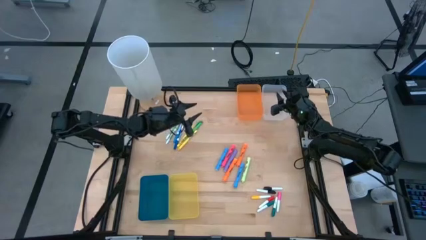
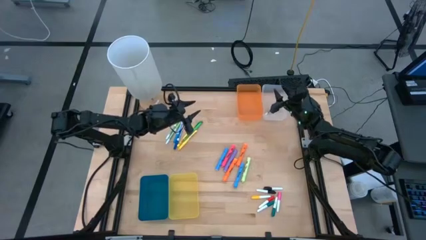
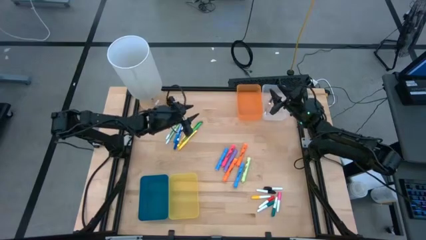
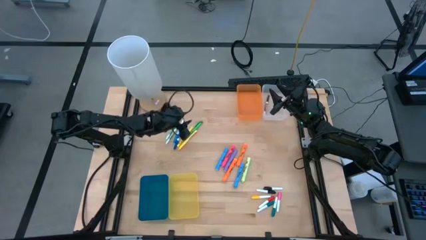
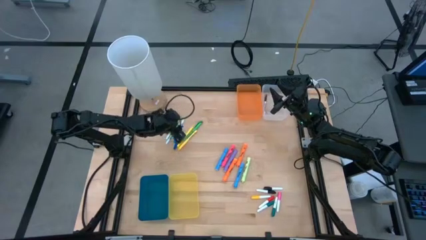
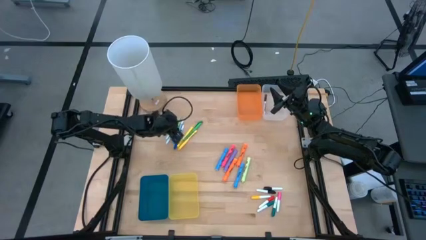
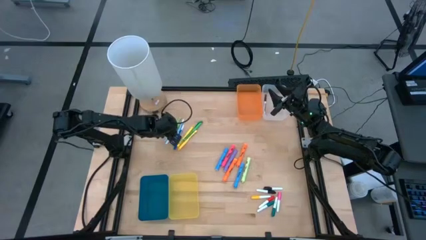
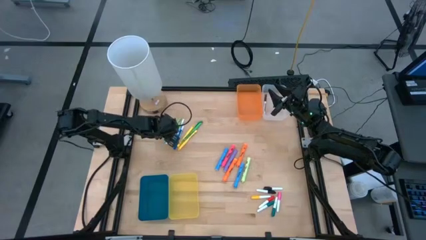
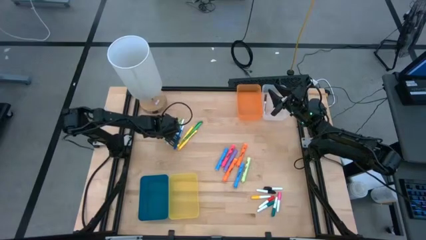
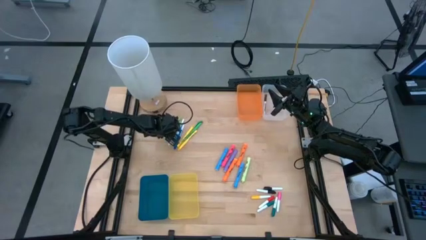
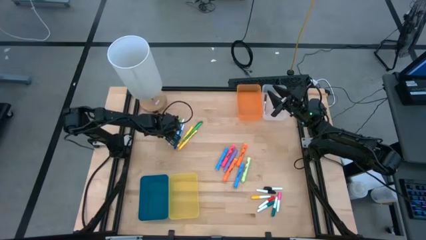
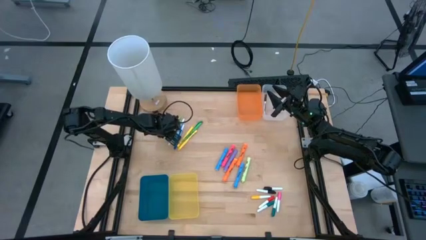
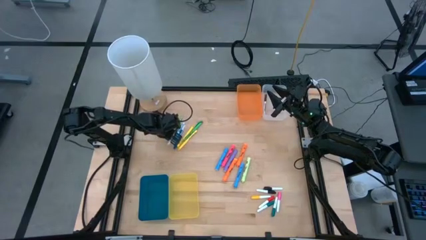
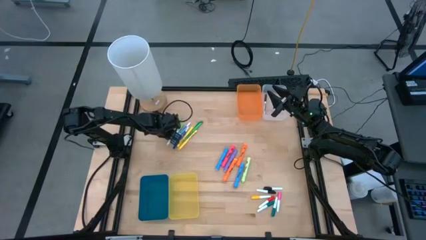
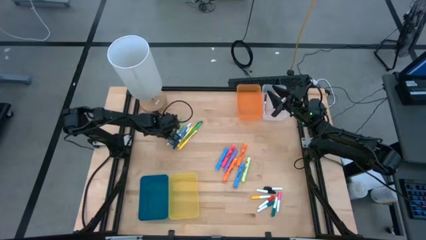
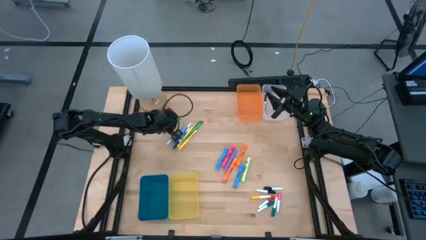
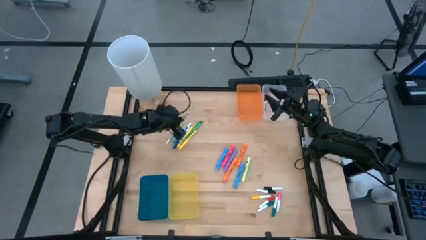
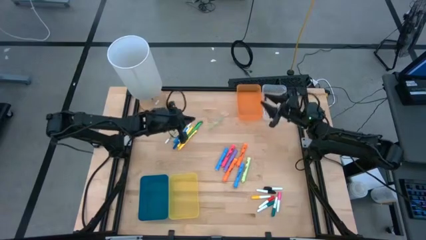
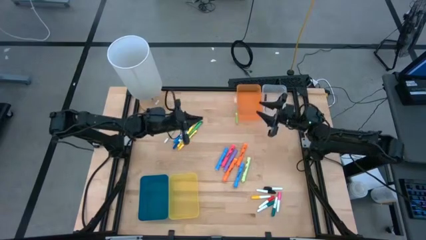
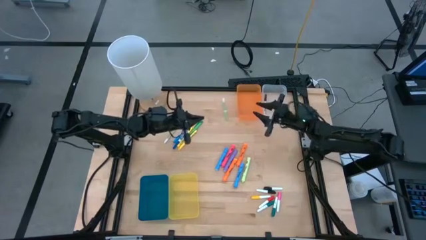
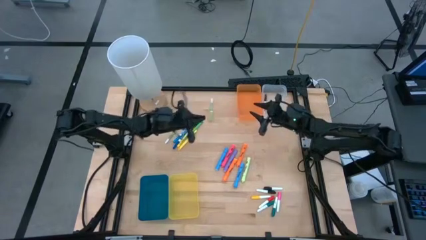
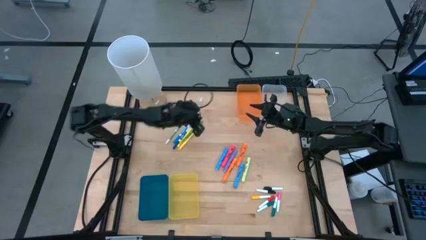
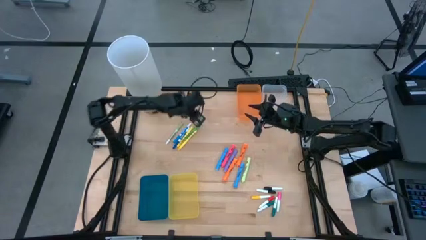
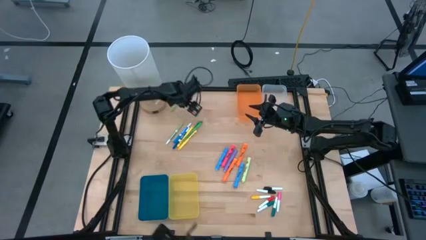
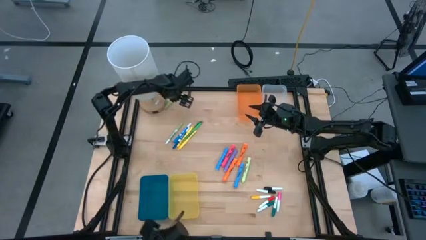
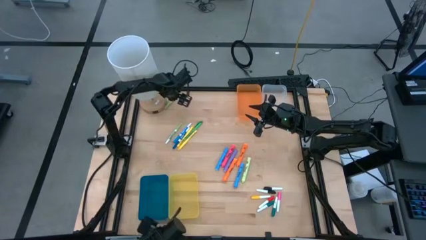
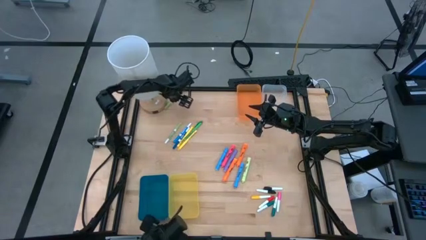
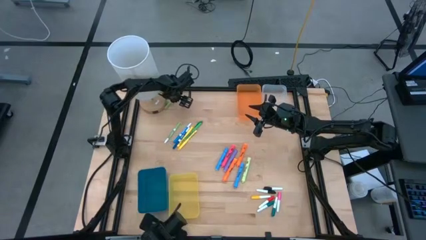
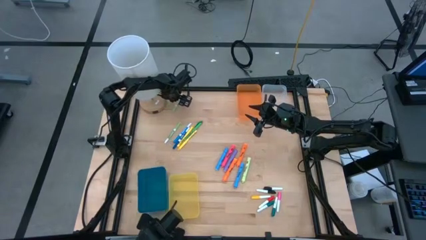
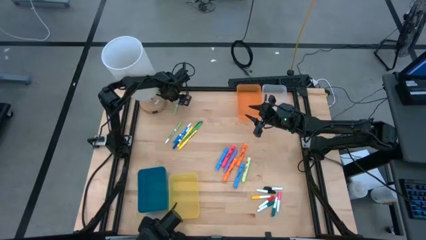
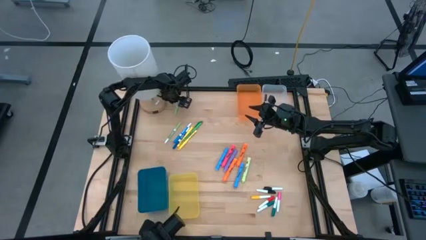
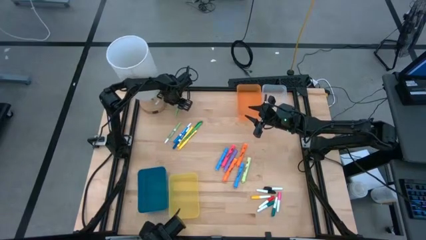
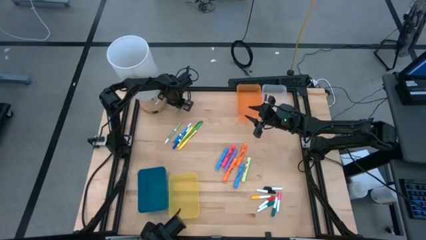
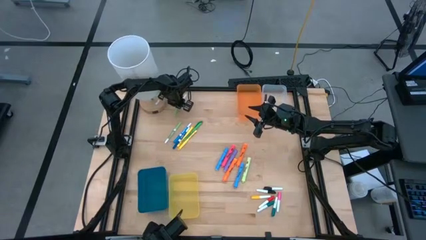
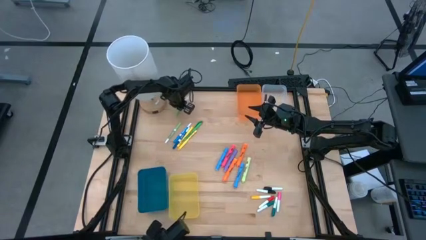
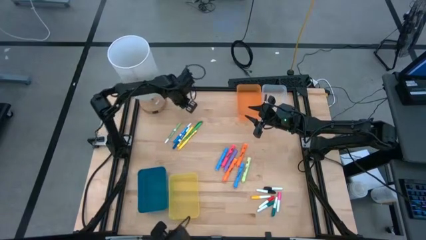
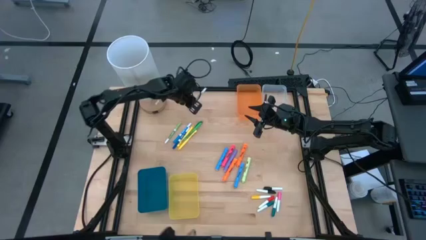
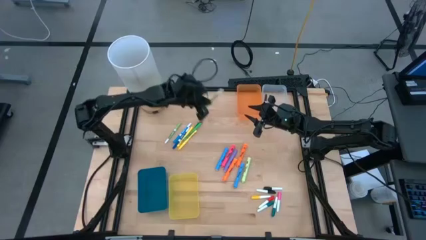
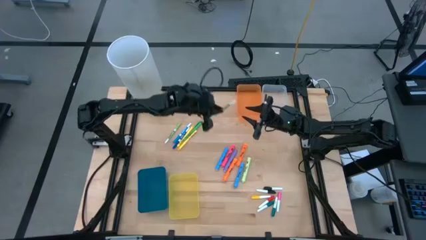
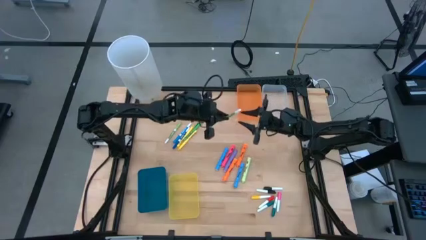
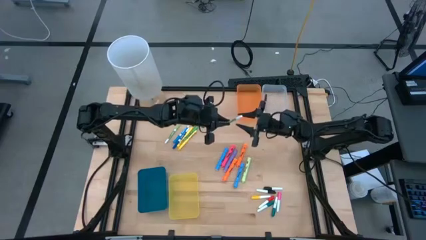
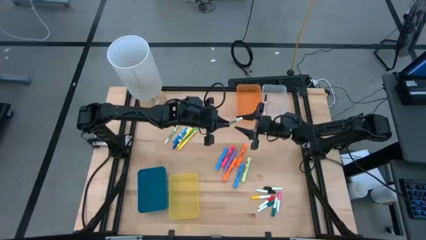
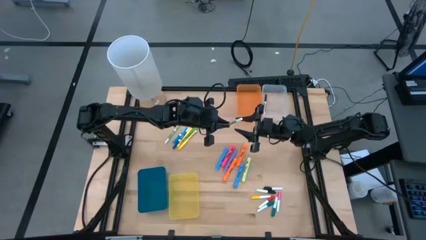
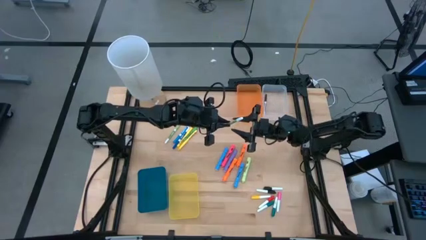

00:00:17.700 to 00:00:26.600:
Task: Pick & Place Markers
Put the left light green marker pen into the transparent bin

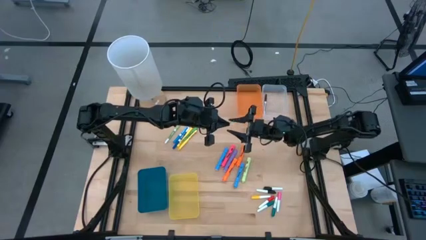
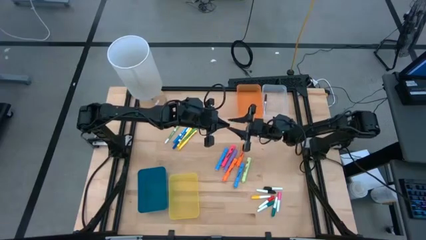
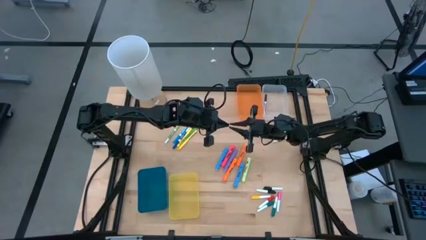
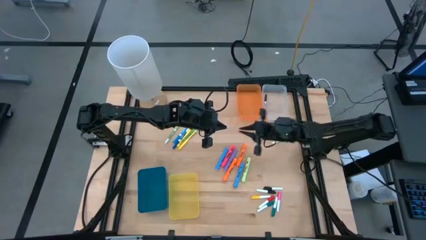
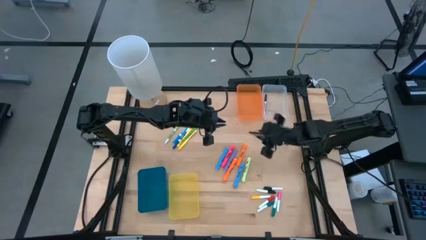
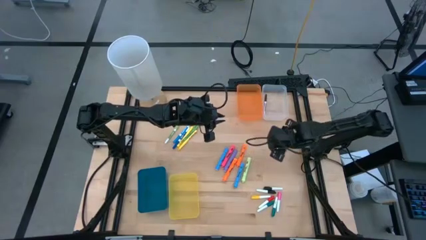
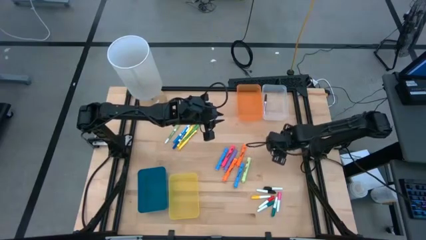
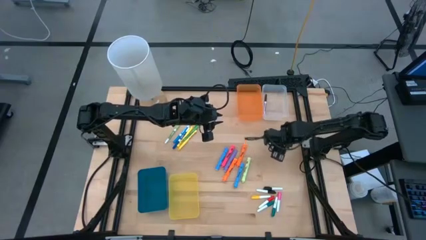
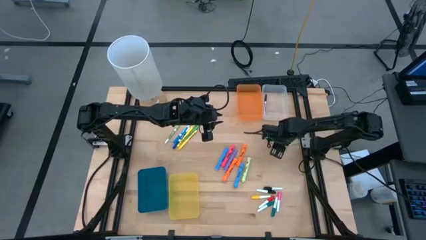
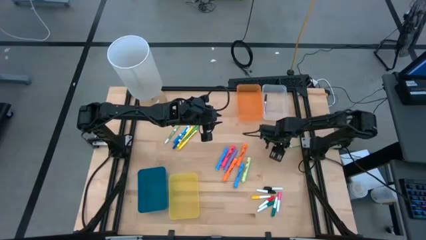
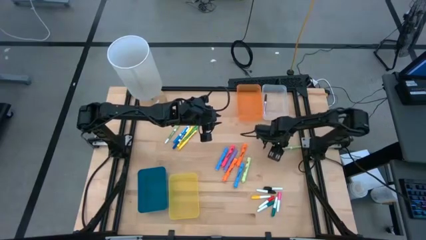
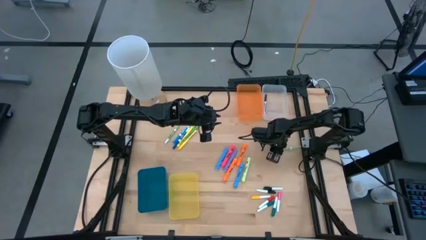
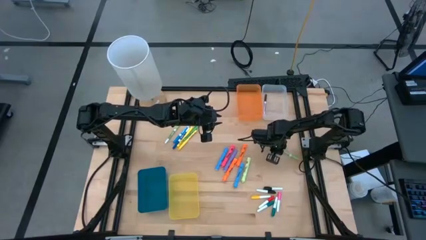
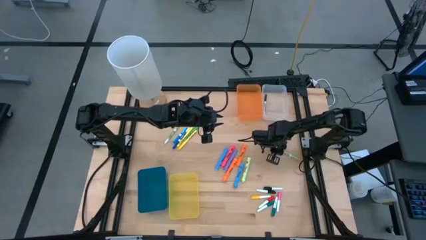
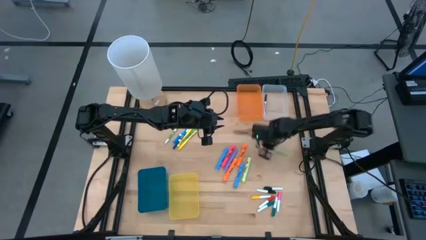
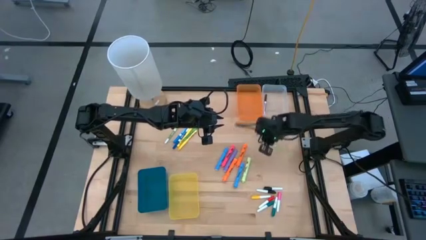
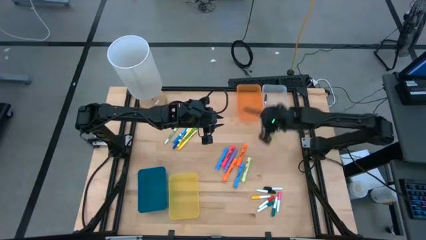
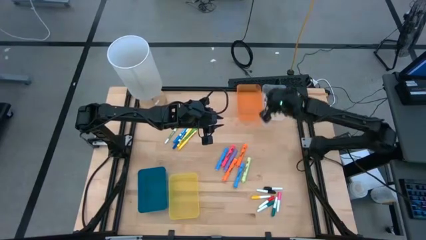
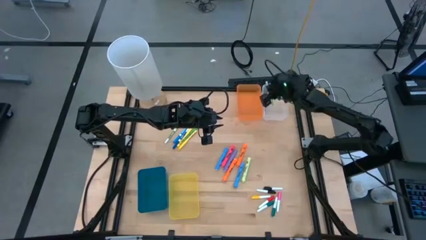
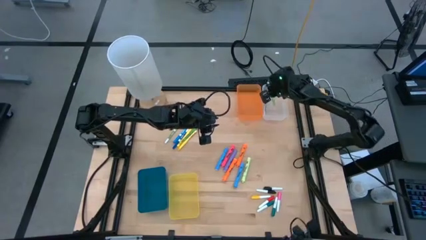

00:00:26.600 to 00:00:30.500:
Put the left light green marker pen into the transparent bin

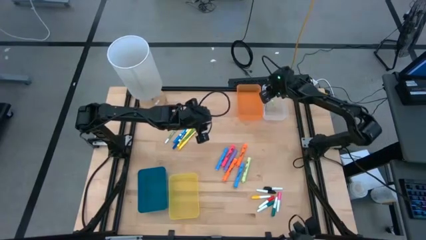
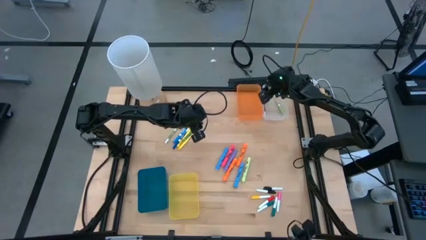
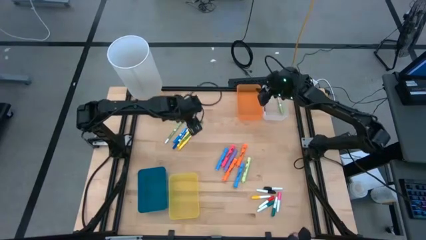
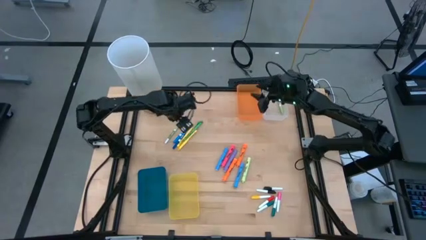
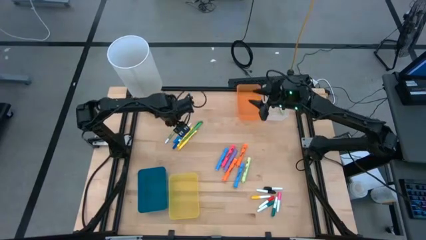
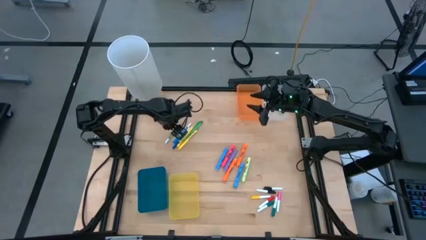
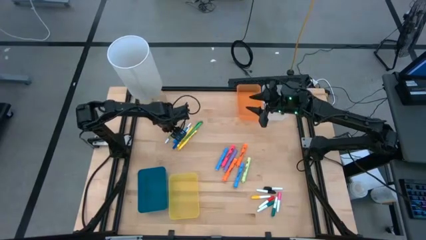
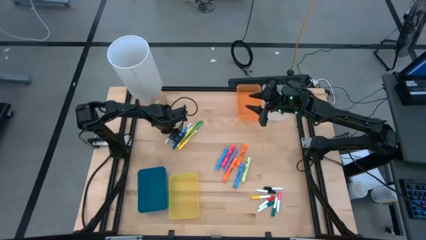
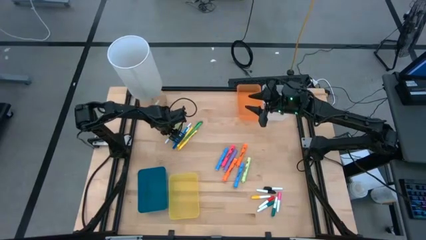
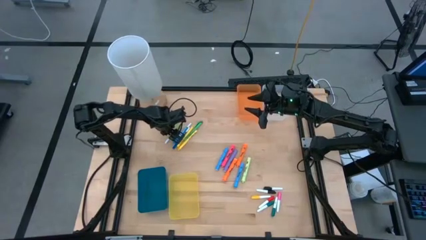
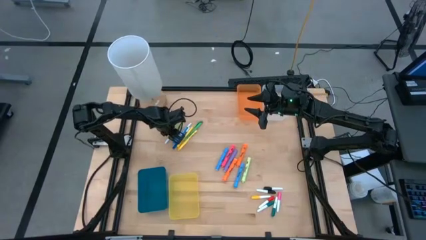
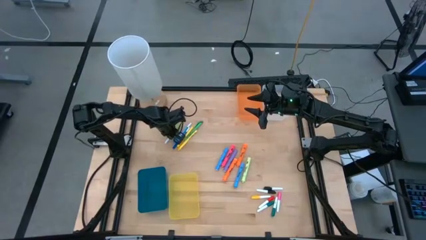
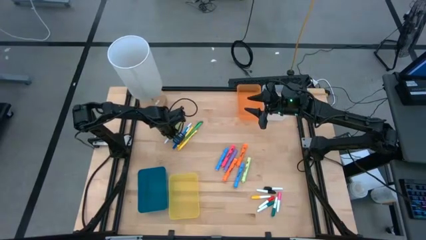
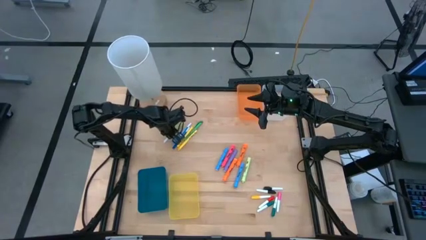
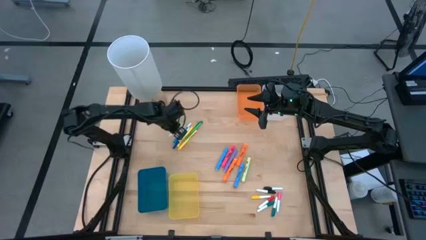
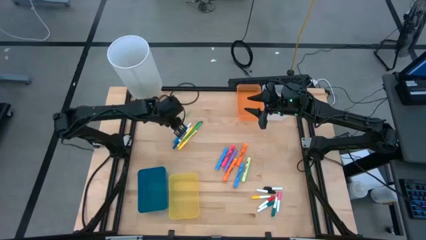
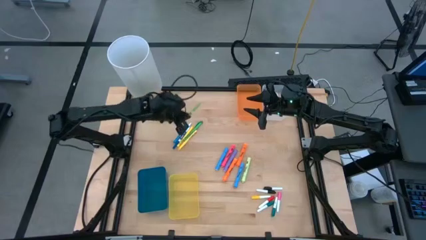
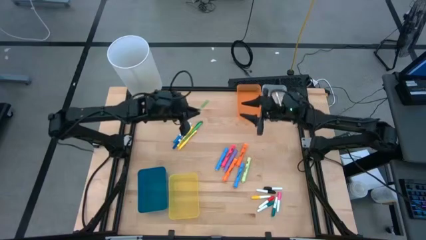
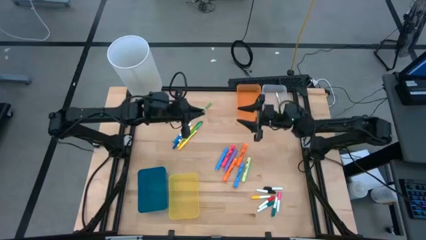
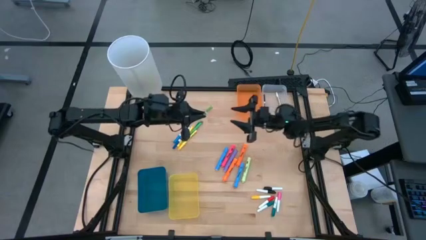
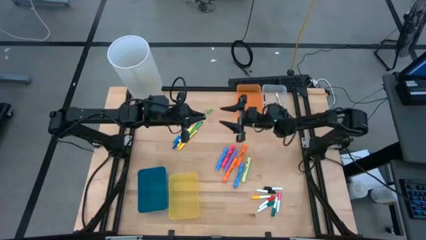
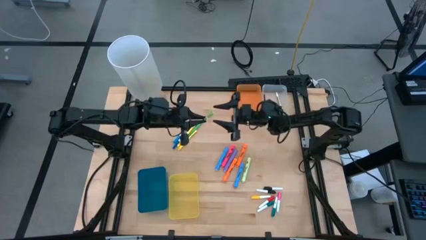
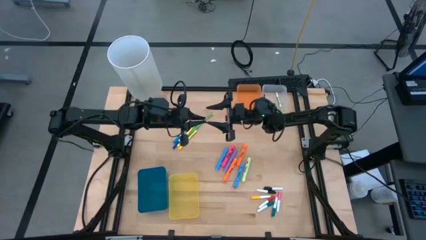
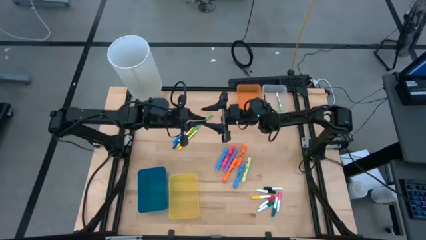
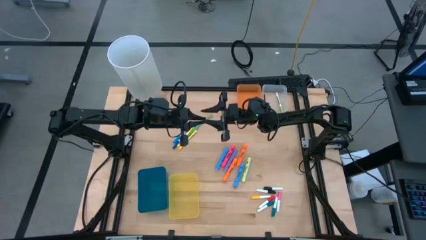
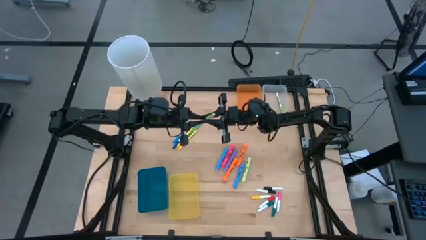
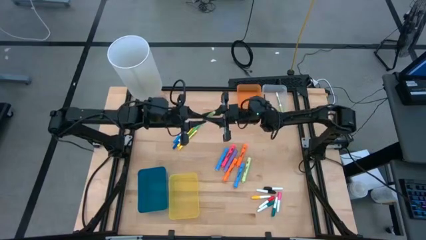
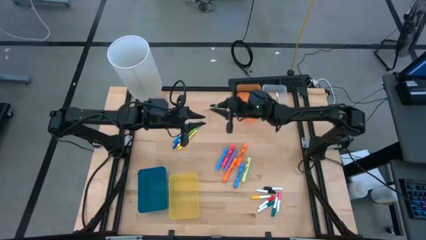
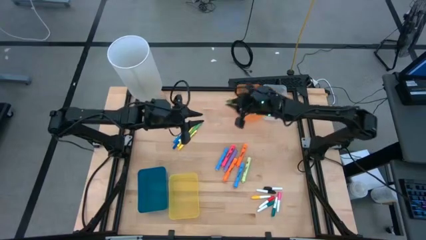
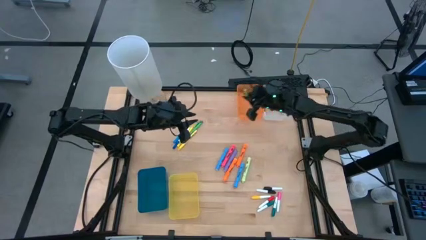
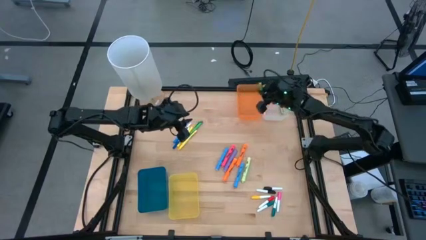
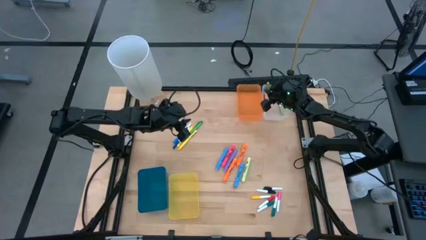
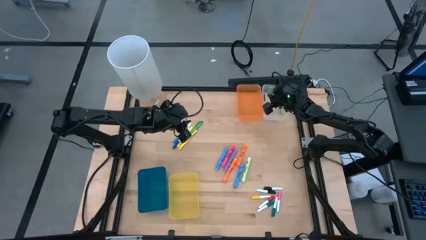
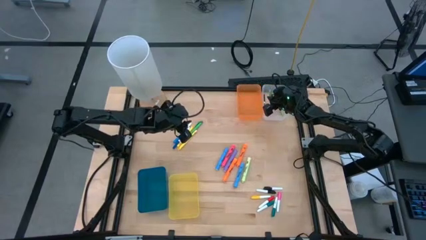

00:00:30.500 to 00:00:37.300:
Put the light green marker pen into the transparent bin
